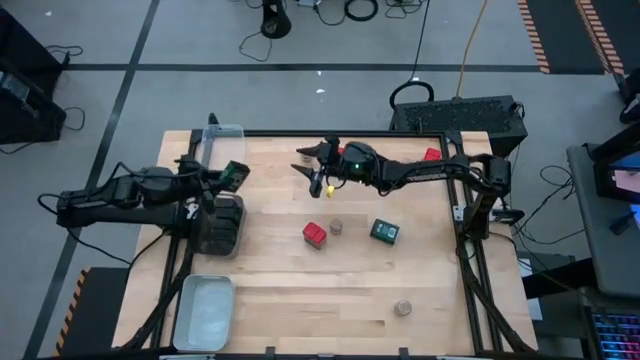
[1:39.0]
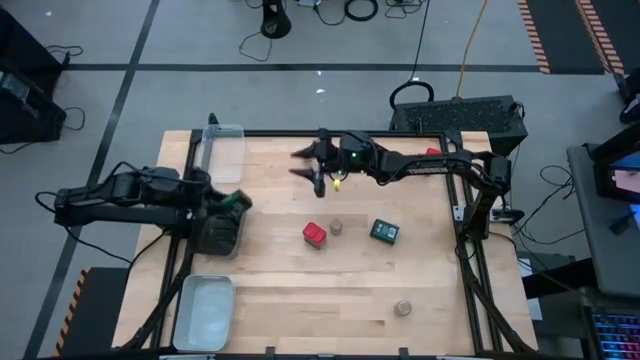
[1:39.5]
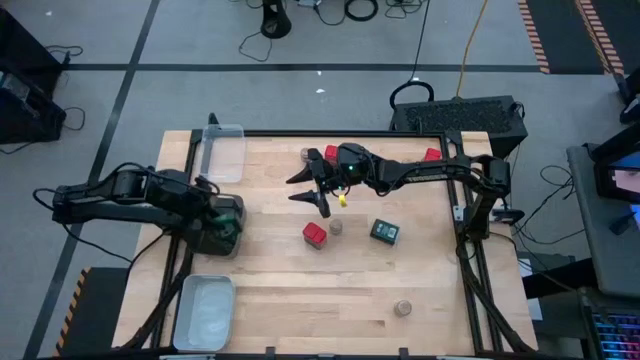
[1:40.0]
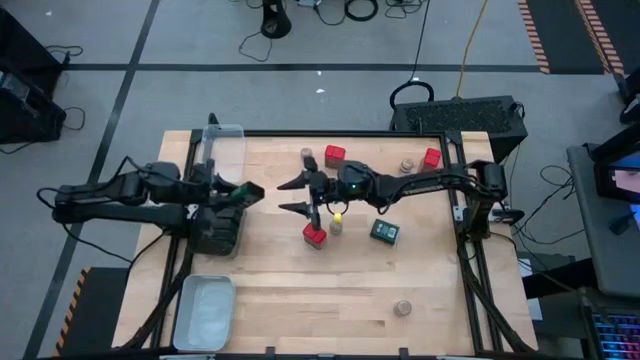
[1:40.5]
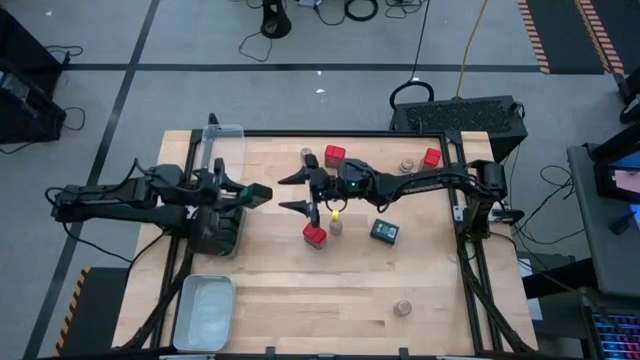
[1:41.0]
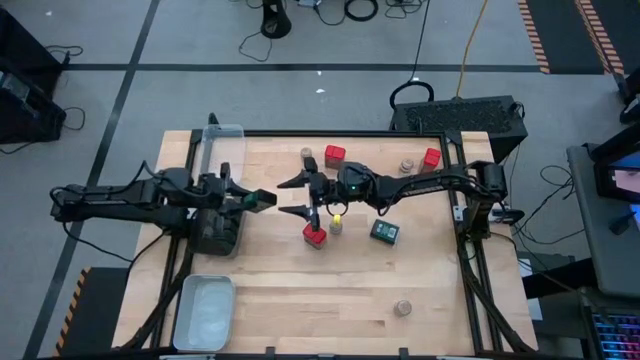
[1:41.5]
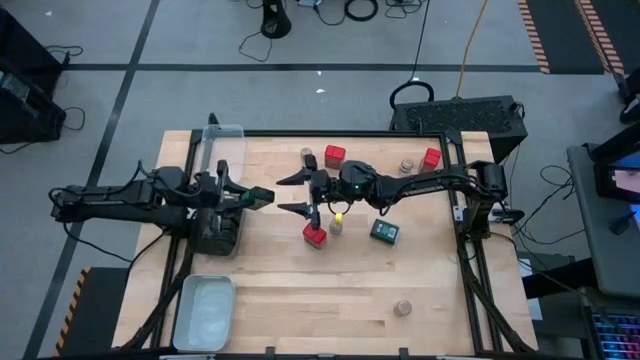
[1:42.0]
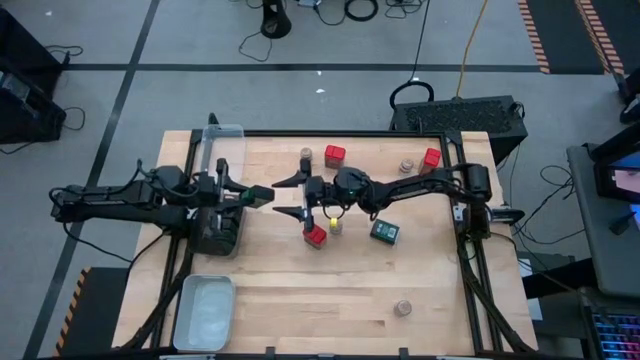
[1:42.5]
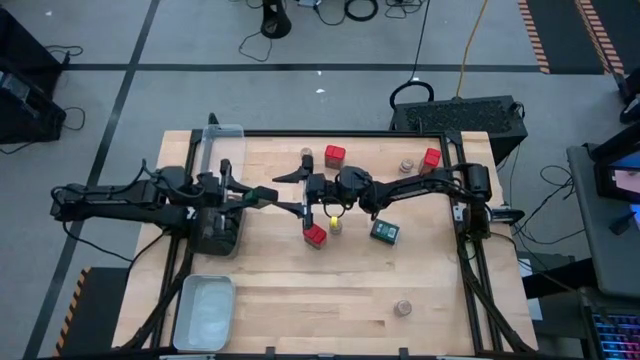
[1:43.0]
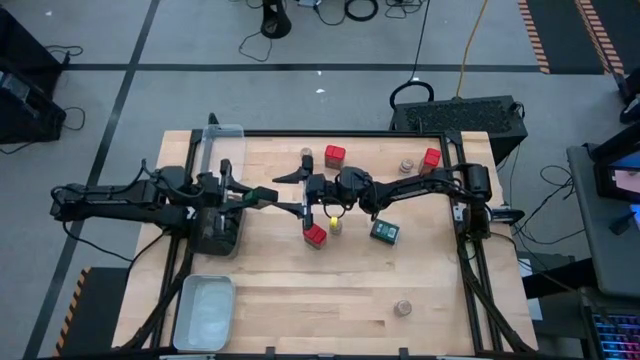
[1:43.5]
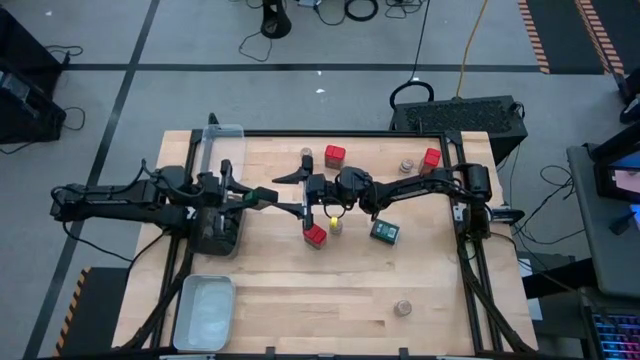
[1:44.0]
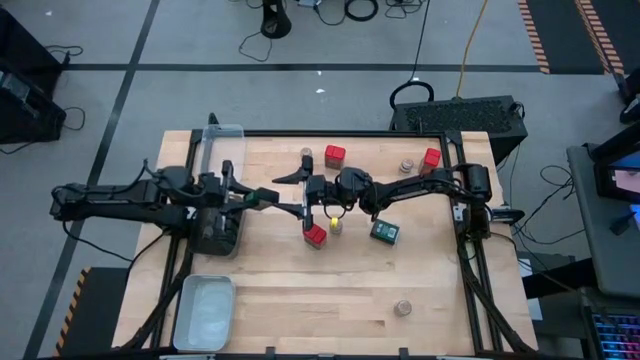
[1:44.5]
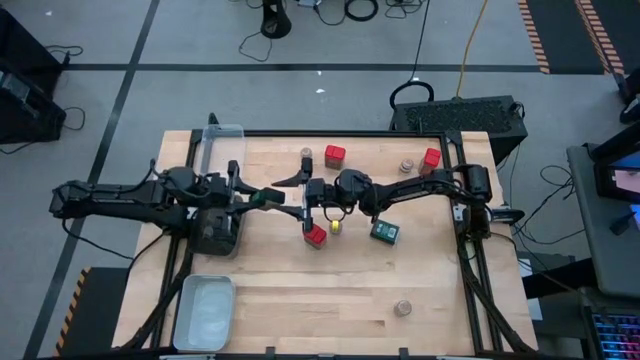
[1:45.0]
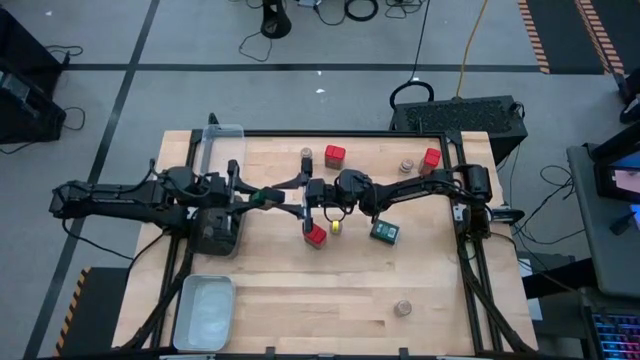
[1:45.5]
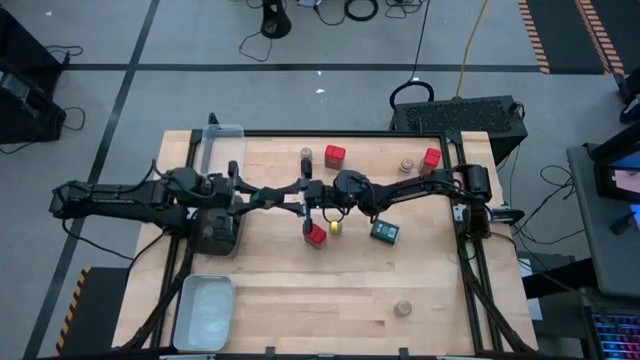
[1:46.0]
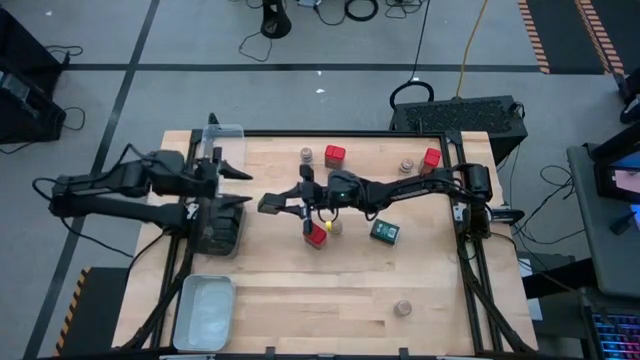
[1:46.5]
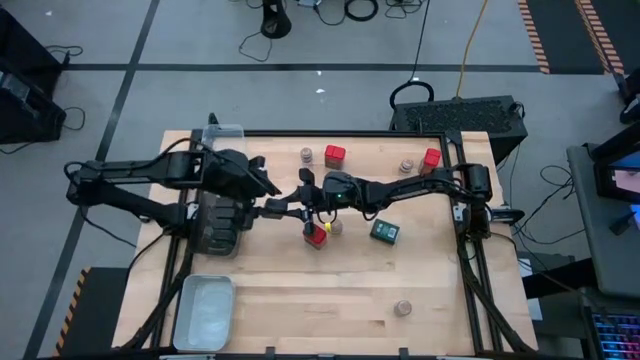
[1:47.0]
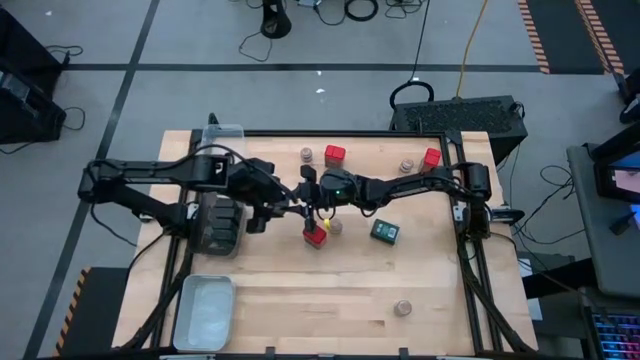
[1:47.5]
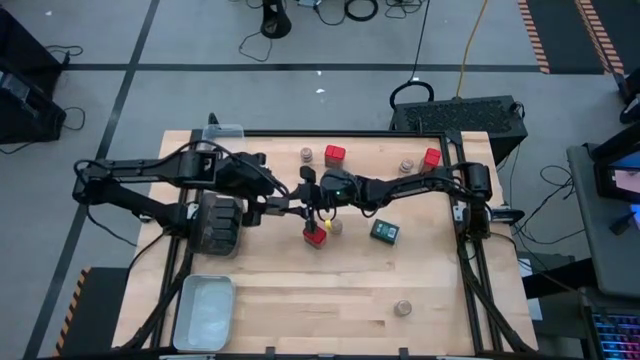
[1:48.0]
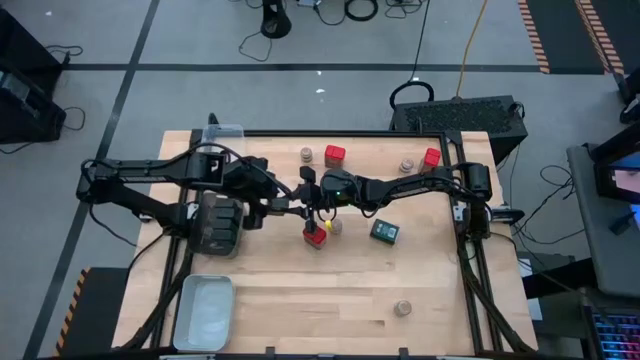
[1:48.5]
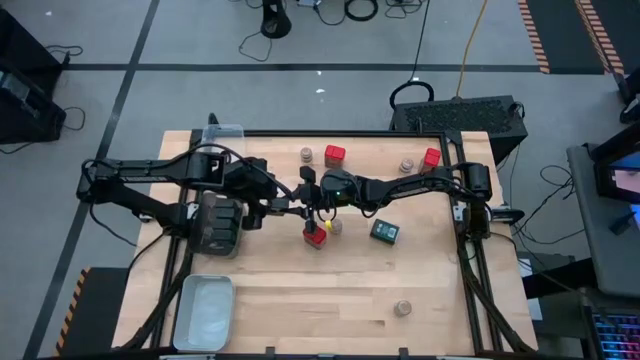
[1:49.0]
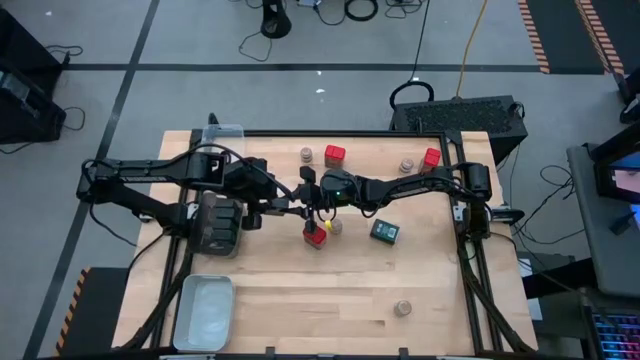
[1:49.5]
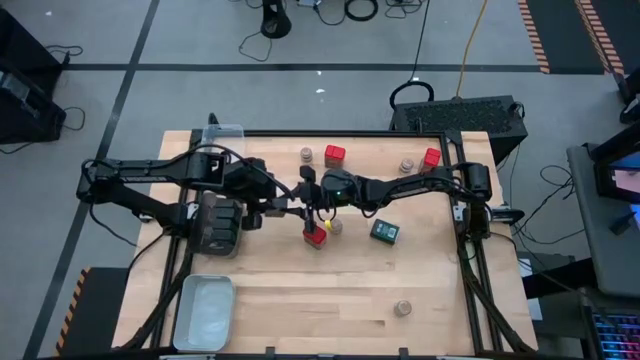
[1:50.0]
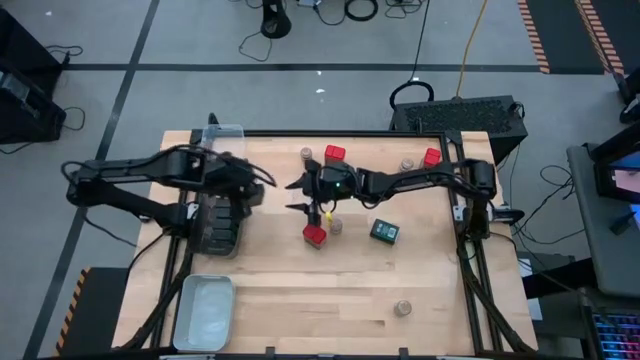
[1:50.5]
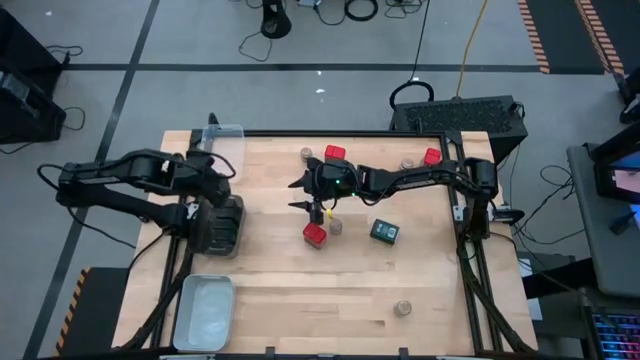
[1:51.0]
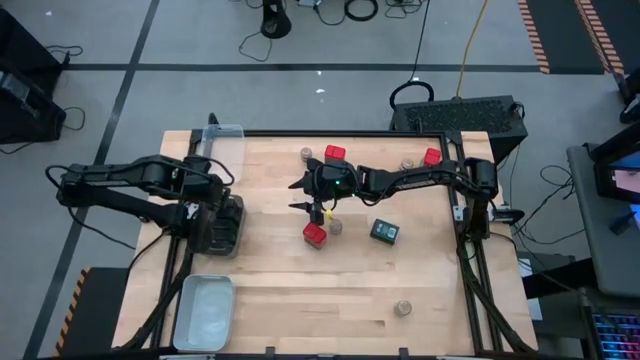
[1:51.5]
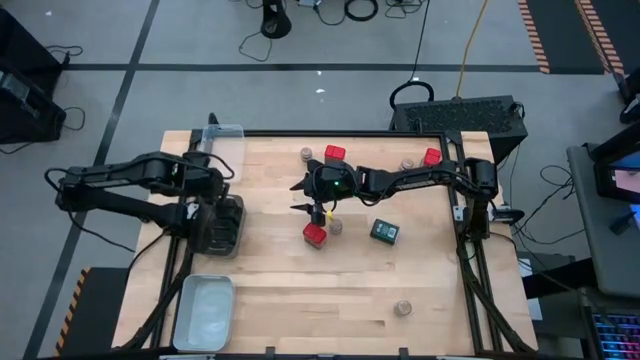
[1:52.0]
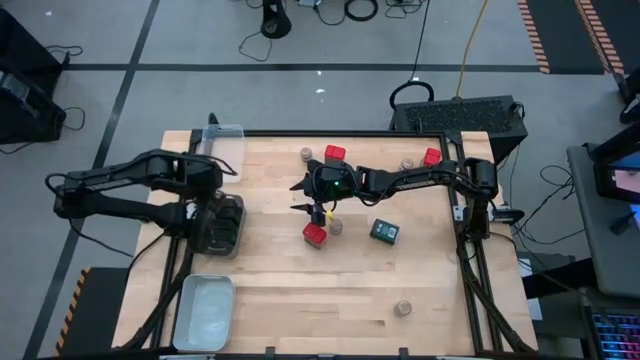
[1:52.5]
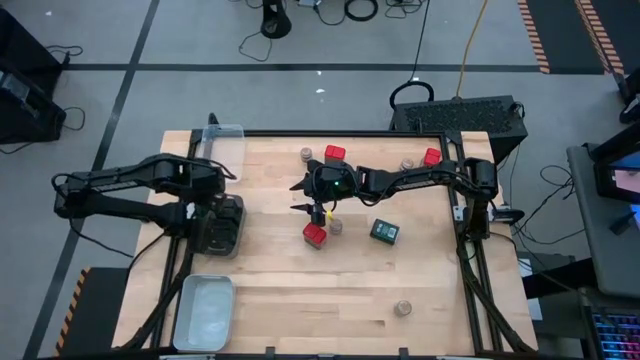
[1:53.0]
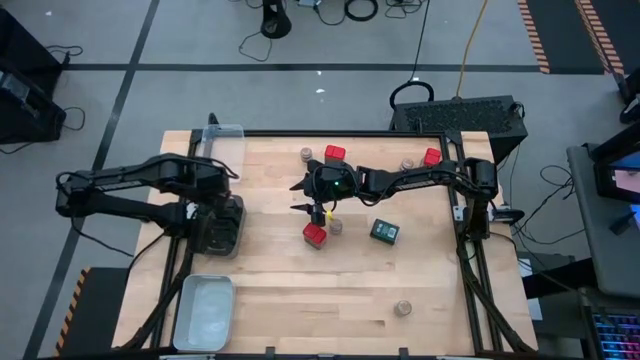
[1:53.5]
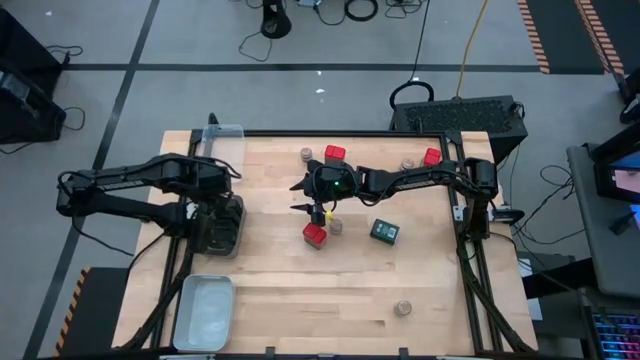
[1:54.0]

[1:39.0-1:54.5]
Task: Sort spices by type
Put the black seasoning can into the black bin

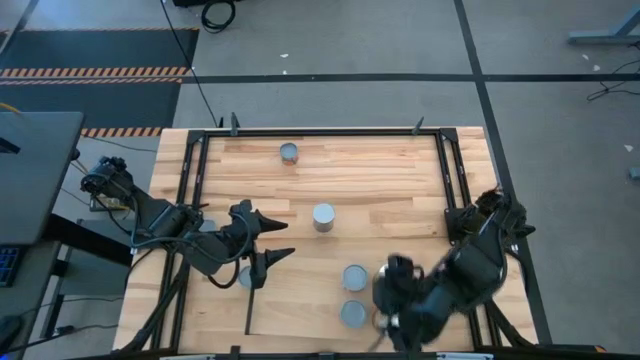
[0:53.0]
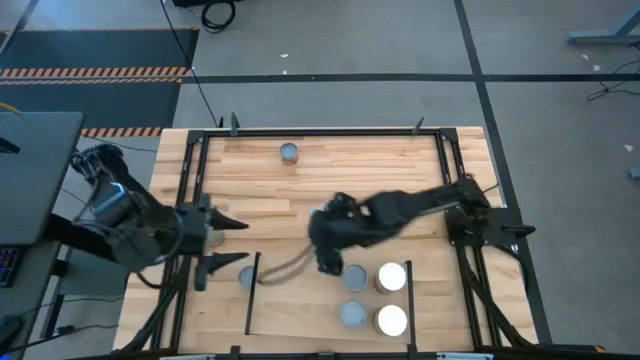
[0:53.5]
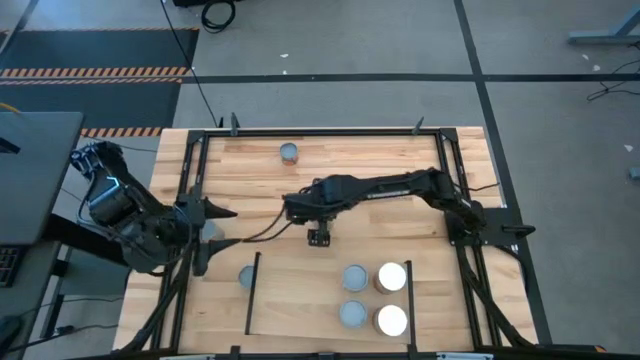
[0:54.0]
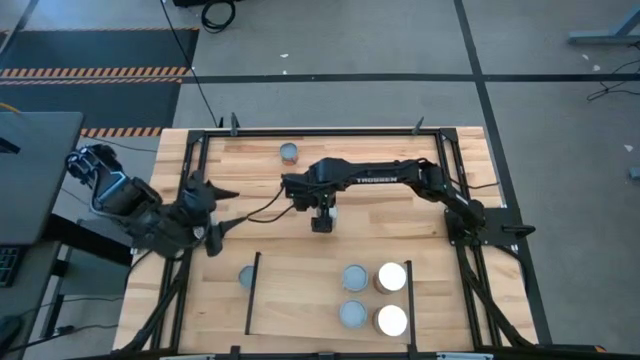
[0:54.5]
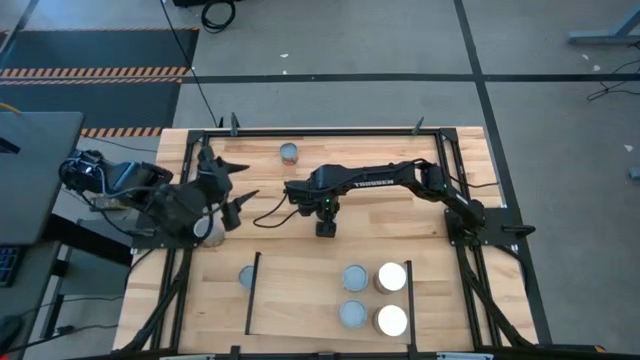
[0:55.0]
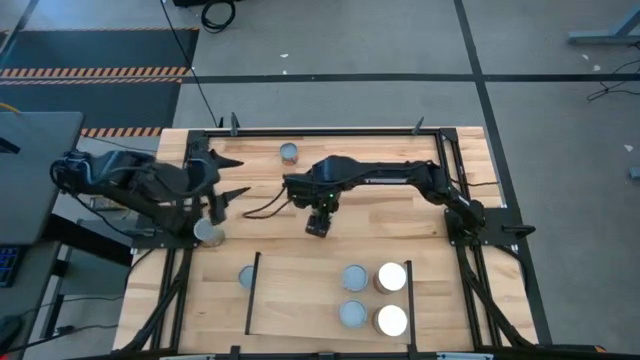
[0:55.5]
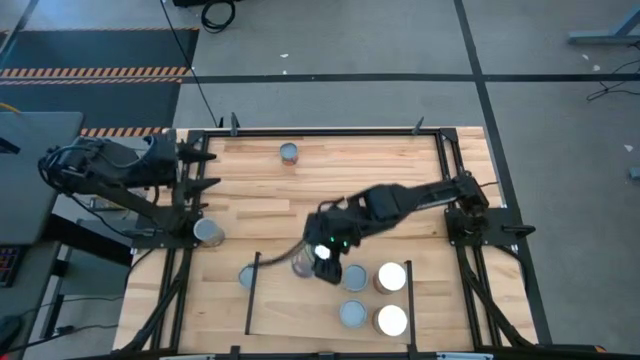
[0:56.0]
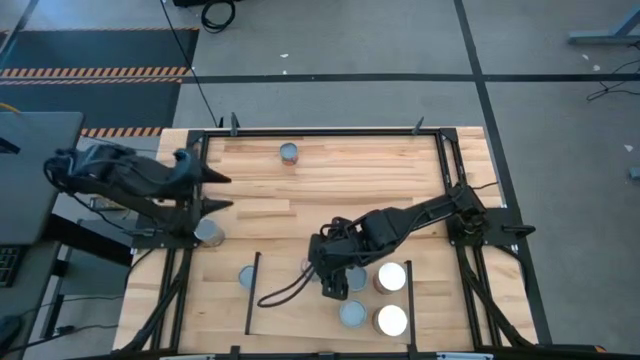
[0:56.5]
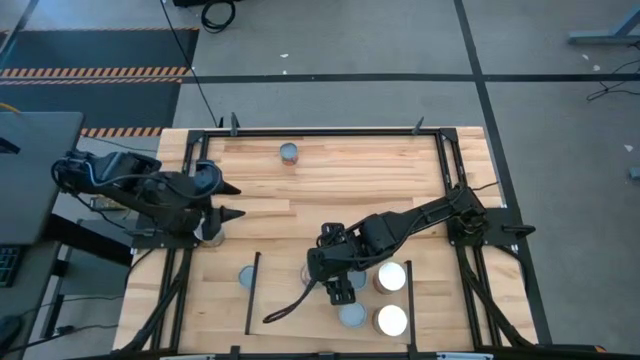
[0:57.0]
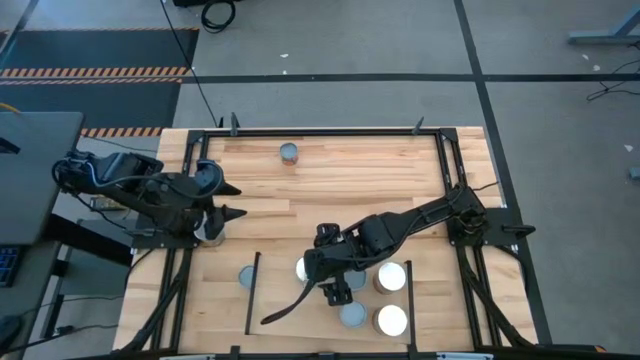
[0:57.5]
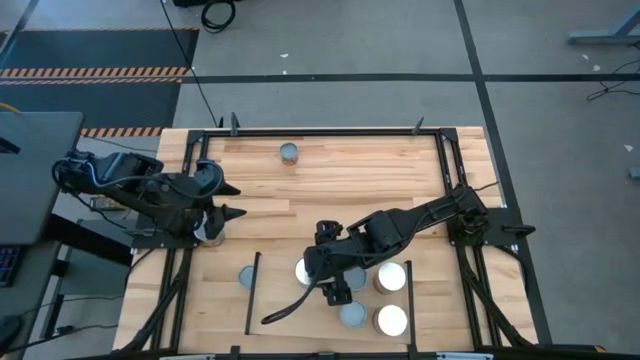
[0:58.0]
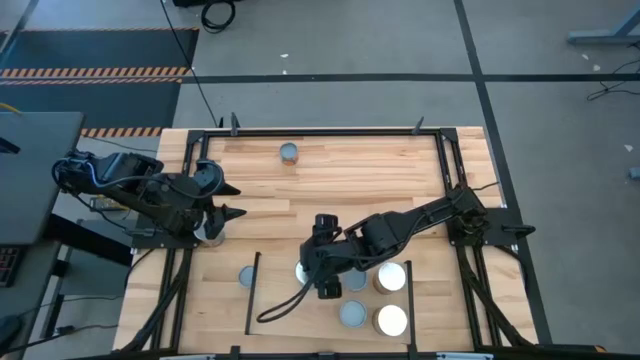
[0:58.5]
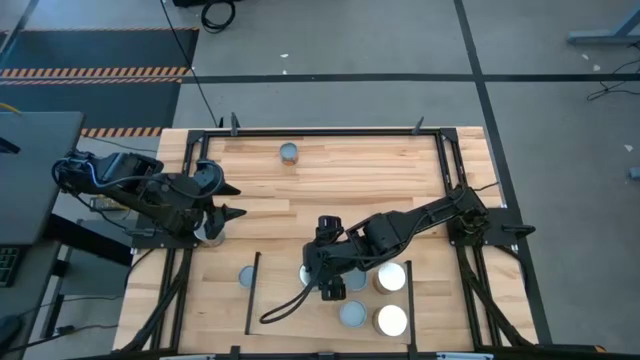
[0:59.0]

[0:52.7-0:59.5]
Task: Pick and place cans onto a shelf
Put the right canned peaches on the shelf
